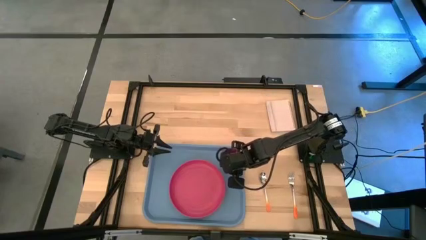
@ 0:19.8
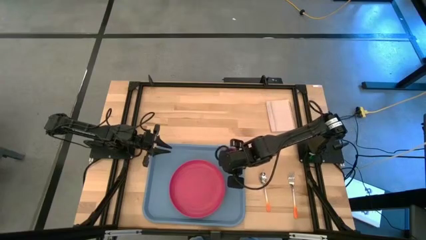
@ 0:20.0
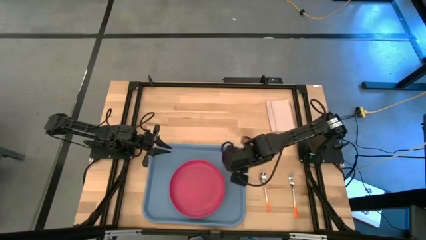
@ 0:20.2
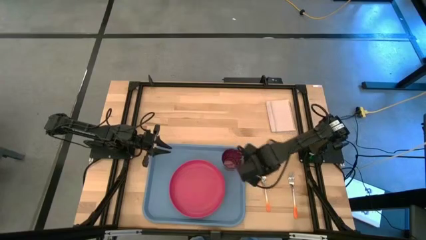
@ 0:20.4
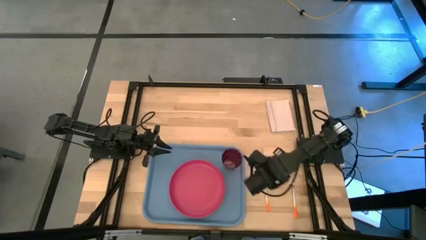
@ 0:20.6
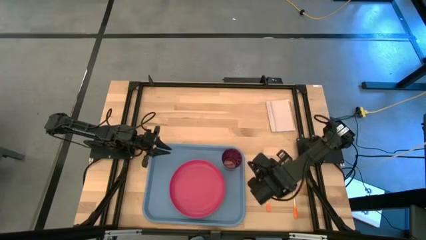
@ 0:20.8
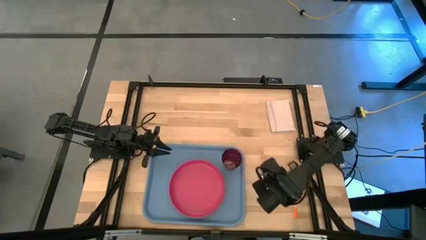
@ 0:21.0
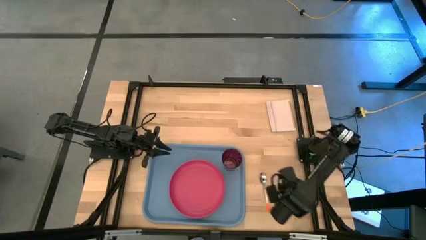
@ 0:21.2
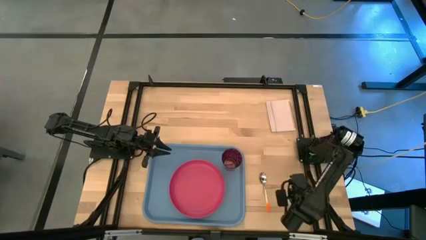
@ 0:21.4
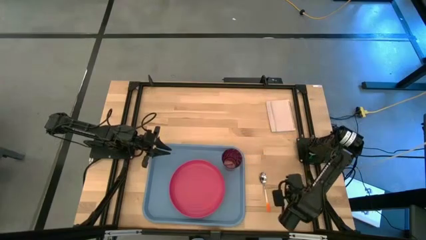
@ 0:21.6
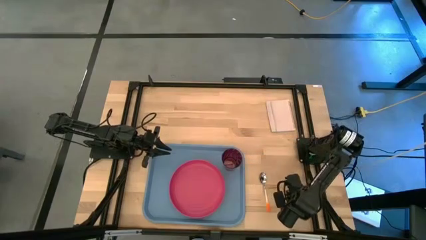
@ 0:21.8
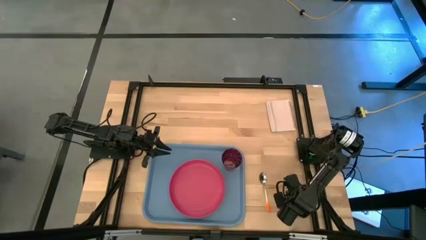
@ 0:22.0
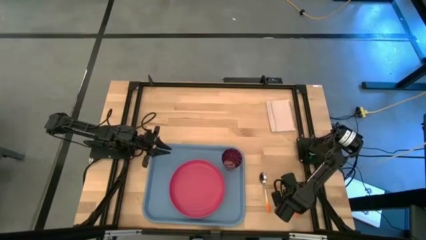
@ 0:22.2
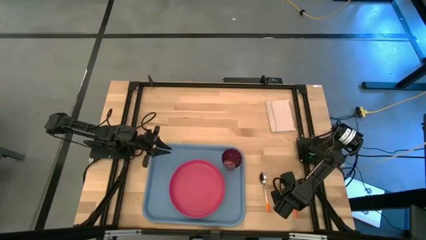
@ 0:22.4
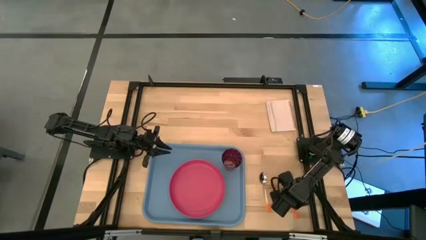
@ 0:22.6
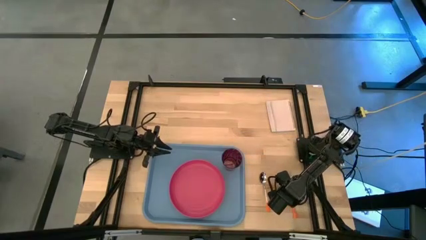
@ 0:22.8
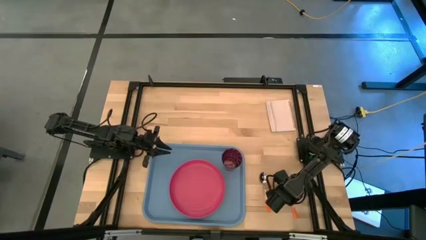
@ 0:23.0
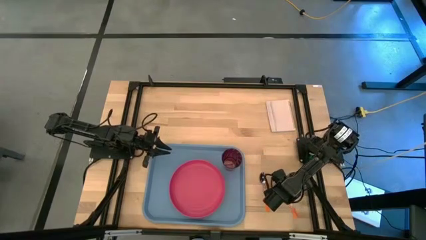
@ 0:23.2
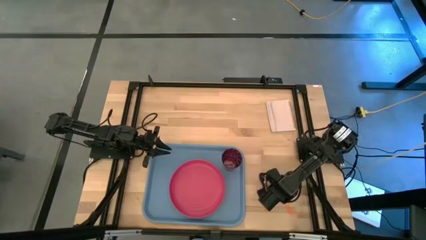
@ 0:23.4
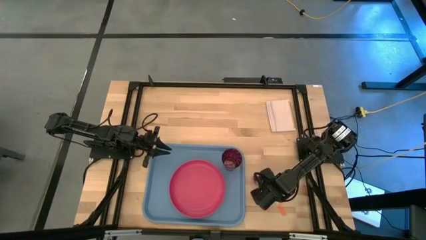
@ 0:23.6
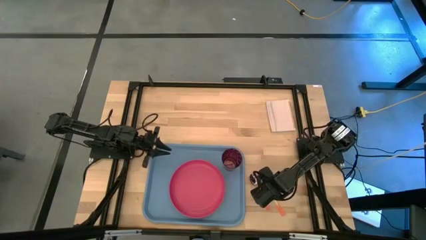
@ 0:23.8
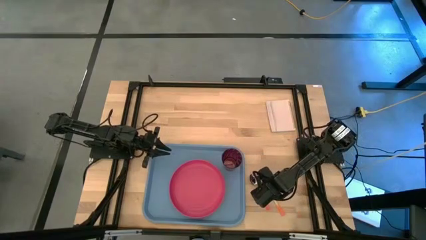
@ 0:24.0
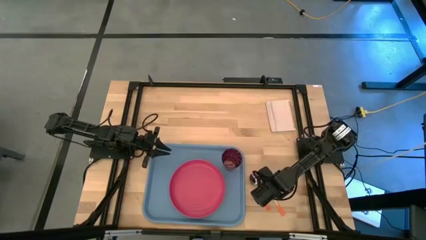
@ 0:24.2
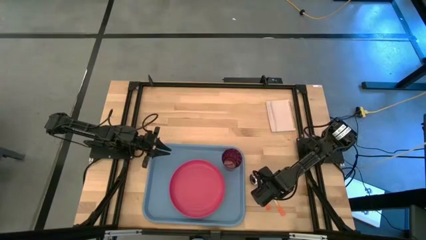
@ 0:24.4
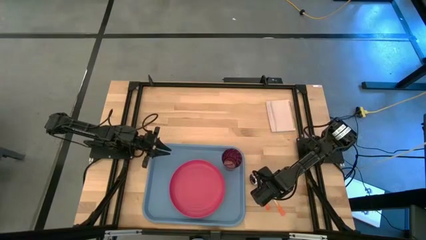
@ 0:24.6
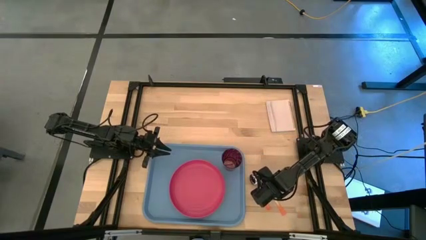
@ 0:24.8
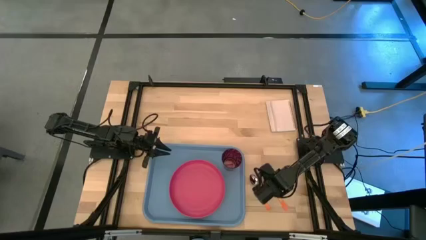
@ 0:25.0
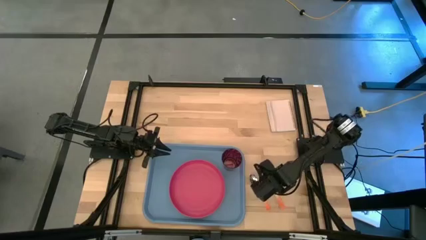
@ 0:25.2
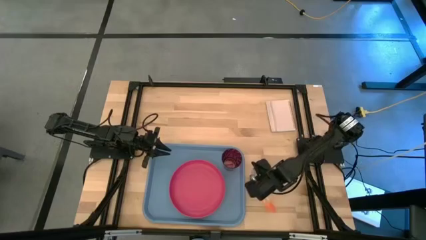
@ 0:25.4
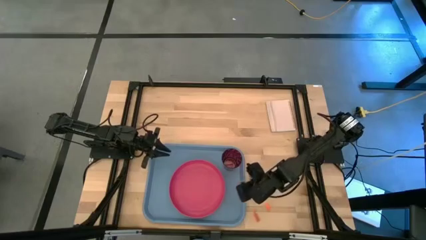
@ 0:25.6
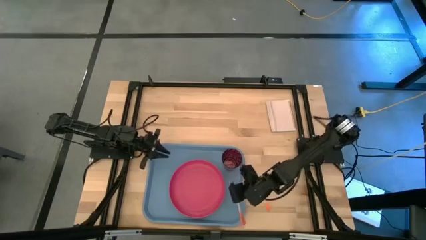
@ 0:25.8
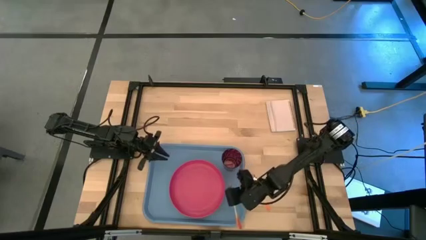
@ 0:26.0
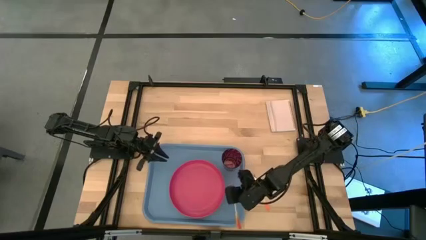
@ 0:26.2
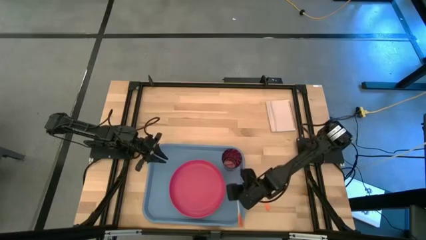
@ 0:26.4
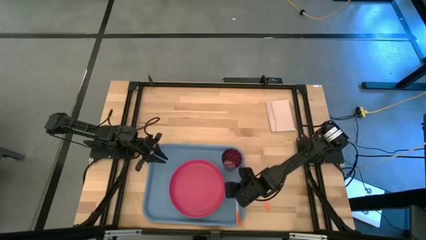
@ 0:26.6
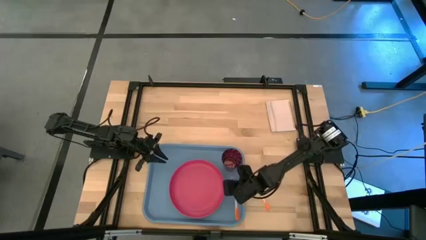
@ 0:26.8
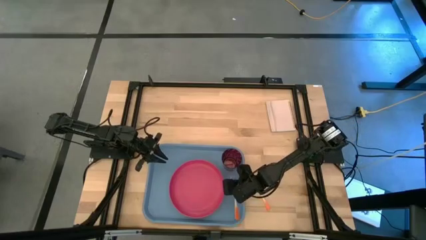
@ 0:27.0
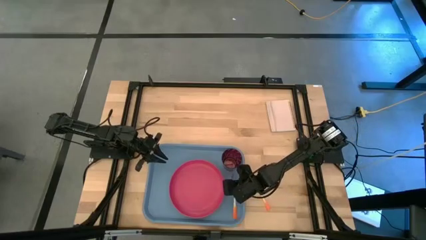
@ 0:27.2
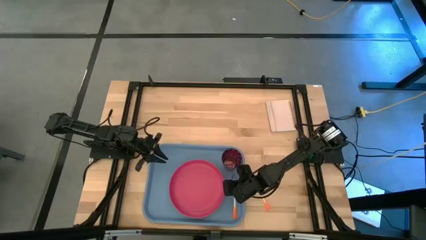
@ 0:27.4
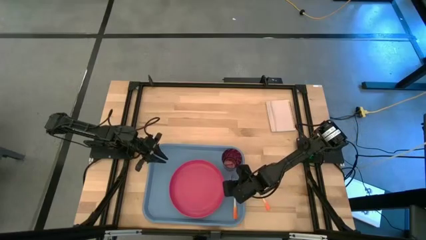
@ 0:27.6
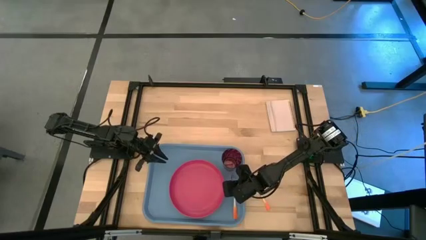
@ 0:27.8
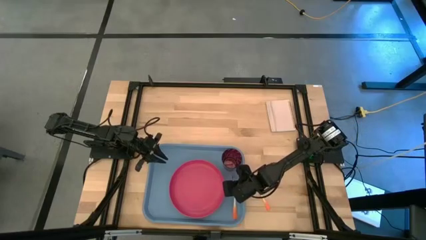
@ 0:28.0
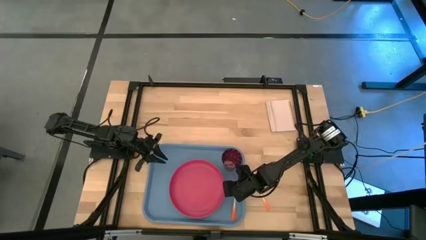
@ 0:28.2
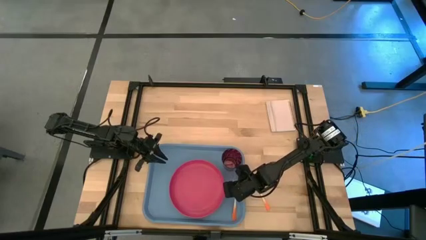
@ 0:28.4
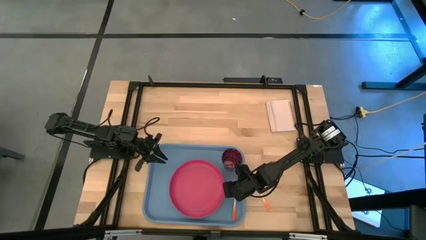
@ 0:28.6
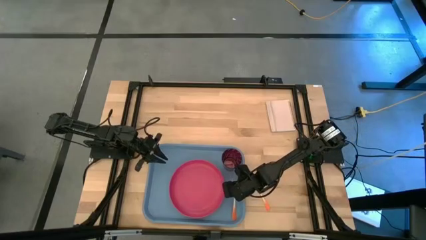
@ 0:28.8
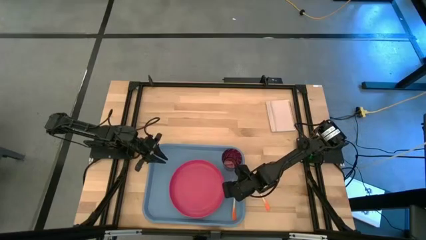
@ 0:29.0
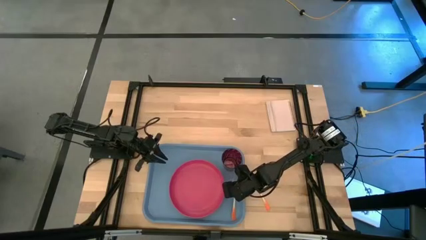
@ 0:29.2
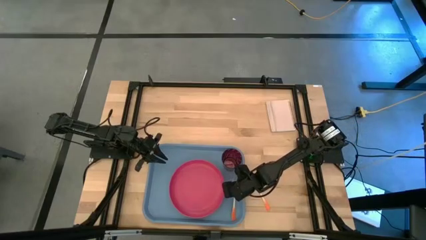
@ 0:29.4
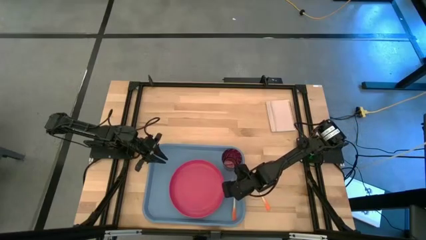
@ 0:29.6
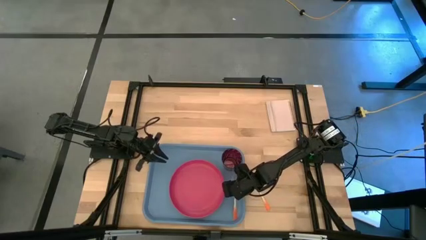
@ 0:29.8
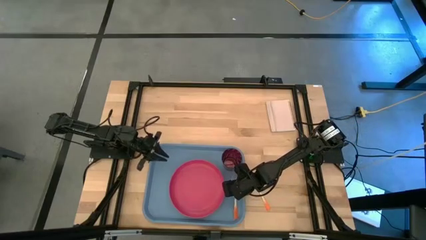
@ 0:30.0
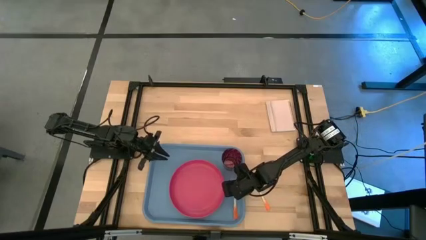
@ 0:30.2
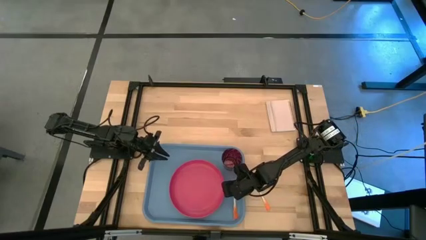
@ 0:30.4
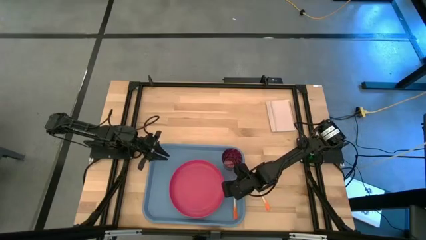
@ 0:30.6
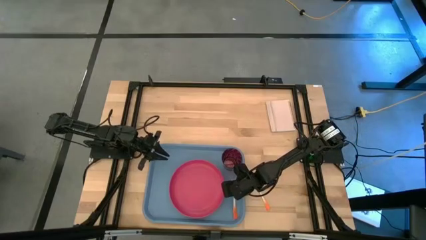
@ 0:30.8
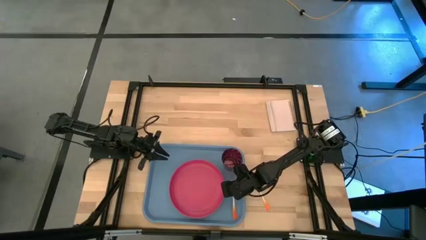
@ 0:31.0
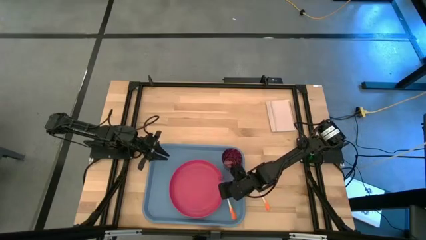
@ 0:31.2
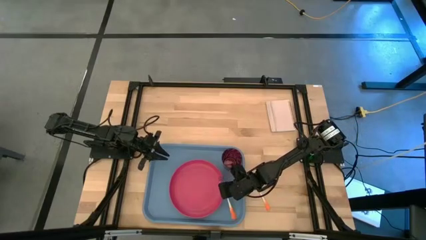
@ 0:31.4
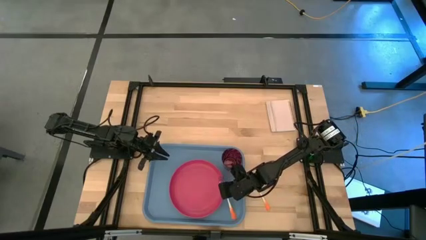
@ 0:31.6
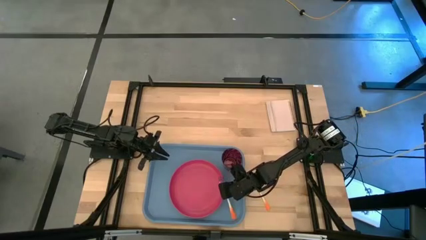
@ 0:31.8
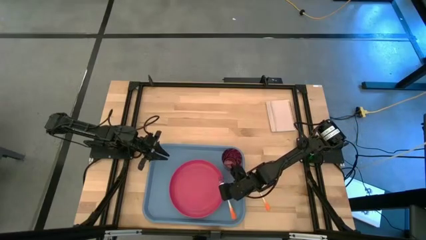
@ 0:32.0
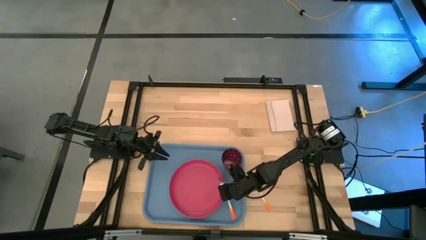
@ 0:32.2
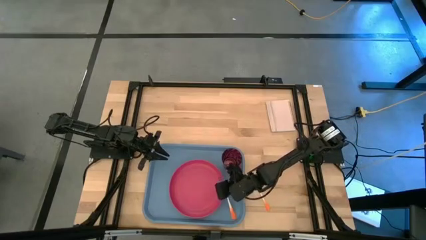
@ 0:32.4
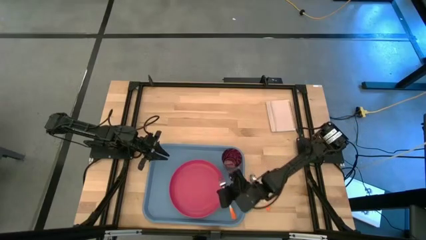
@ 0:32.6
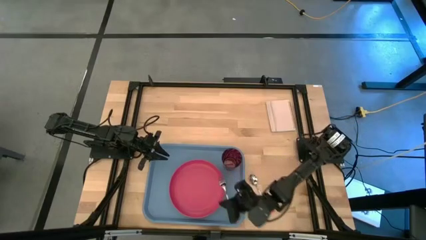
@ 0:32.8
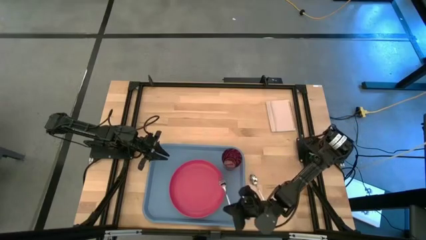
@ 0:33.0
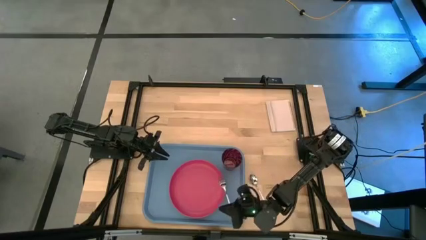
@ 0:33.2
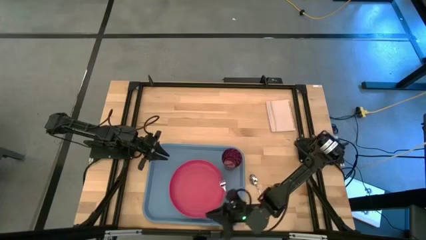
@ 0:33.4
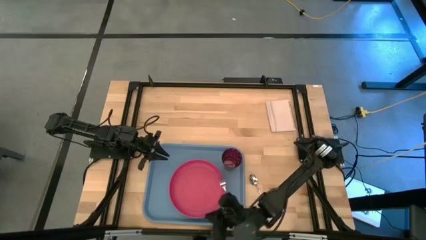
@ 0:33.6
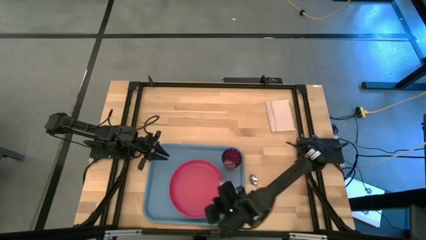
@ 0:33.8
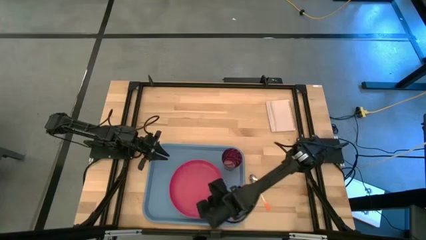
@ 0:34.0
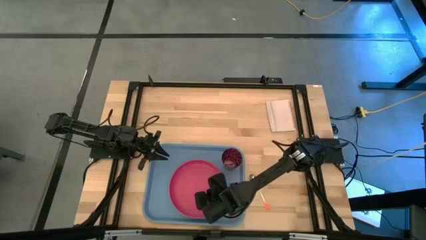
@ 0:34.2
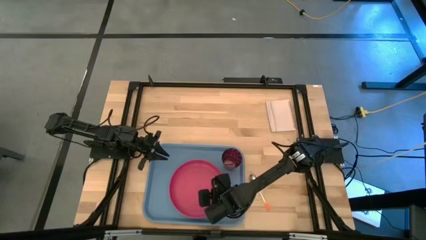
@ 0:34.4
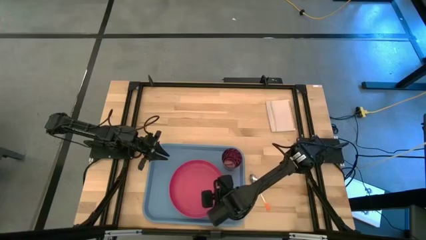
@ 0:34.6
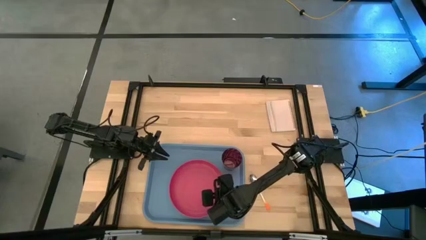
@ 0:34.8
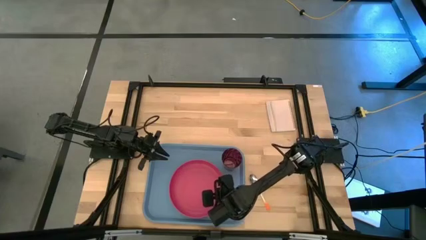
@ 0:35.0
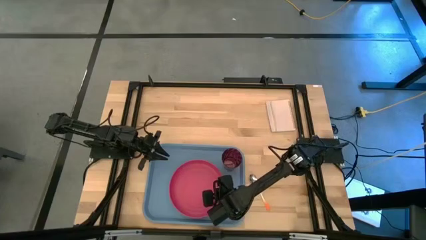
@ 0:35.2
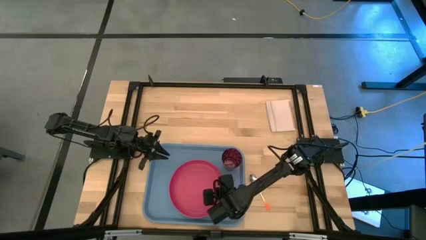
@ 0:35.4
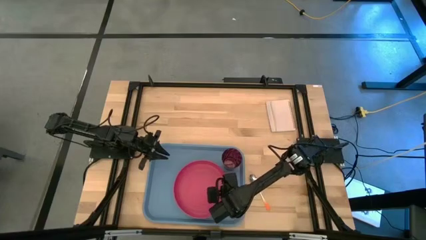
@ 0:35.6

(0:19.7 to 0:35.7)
Task: Pick and place plate/cup/fork/spoon on tray
Put the orange fork on the blue serving tray to the right of the pink plate

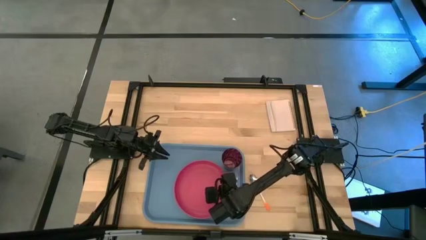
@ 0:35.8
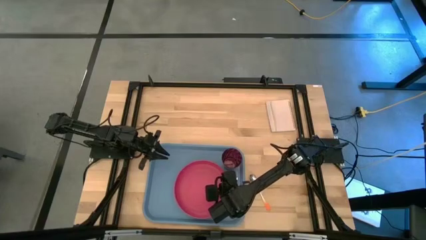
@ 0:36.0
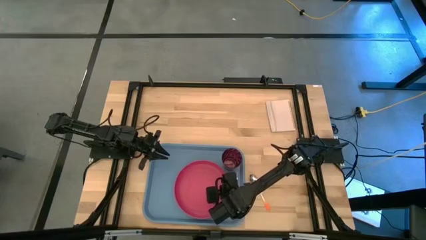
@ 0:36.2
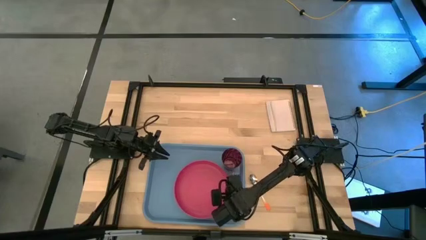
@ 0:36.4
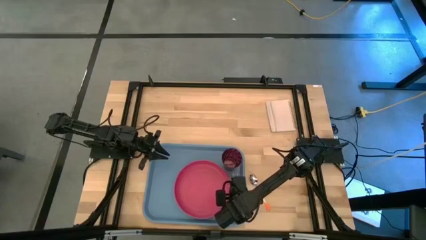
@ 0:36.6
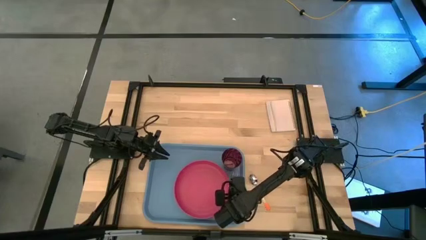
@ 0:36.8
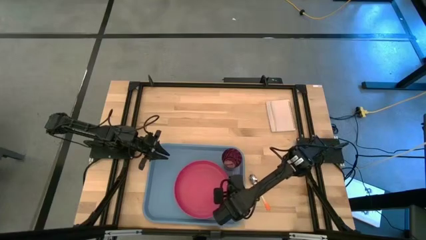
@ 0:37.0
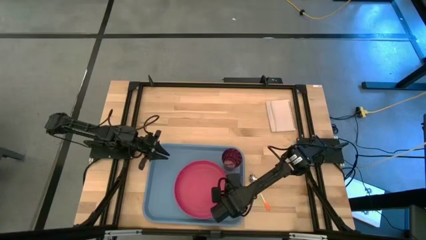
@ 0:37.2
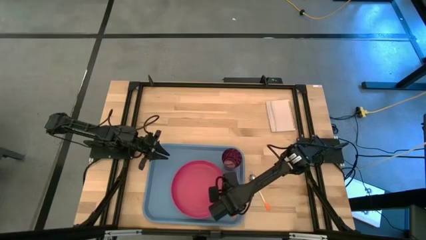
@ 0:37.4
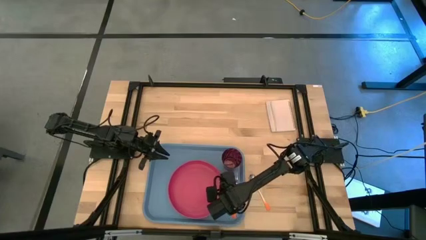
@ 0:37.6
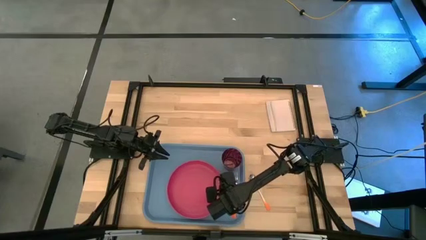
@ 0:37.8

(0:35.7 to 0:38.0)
Adjust the pink plate on the blue serving tray
